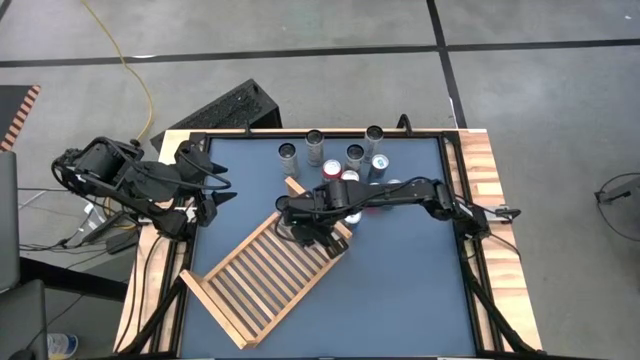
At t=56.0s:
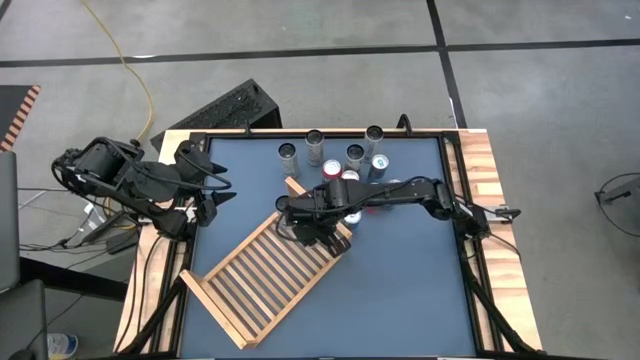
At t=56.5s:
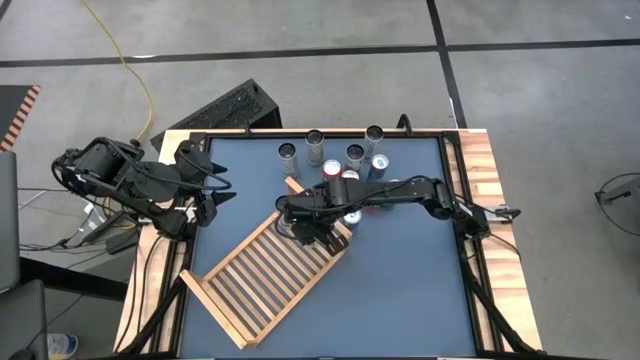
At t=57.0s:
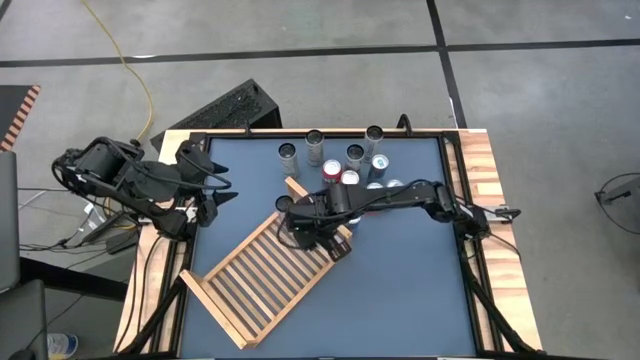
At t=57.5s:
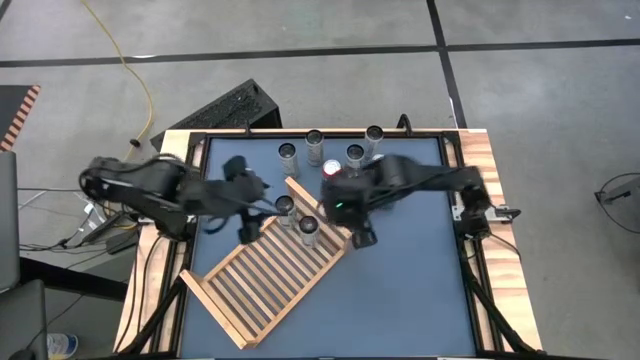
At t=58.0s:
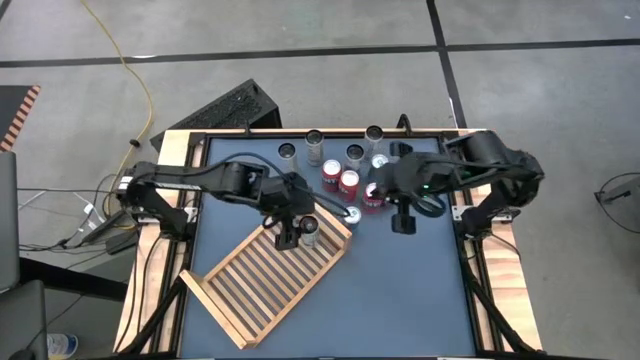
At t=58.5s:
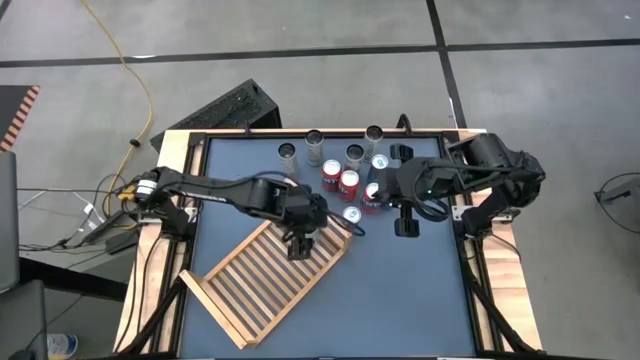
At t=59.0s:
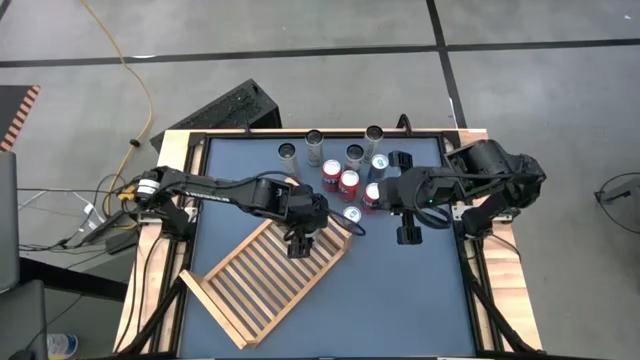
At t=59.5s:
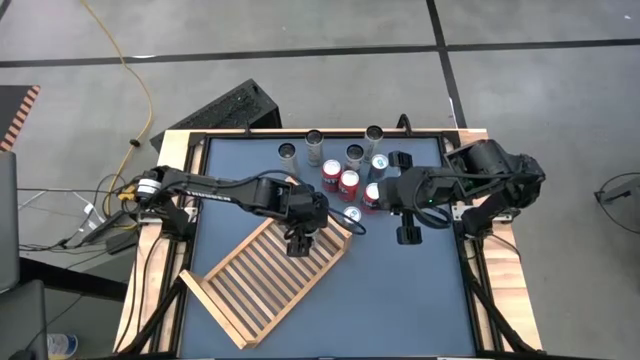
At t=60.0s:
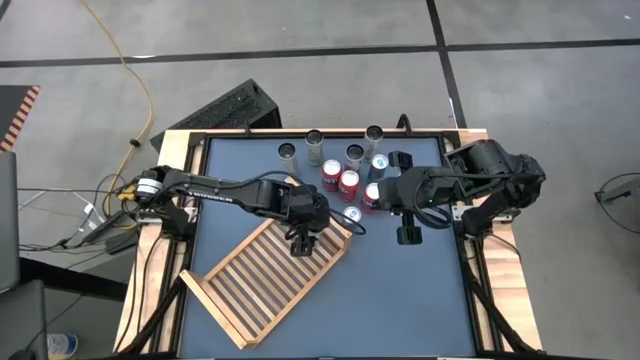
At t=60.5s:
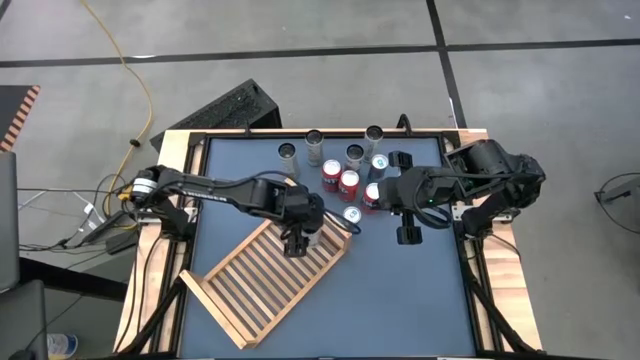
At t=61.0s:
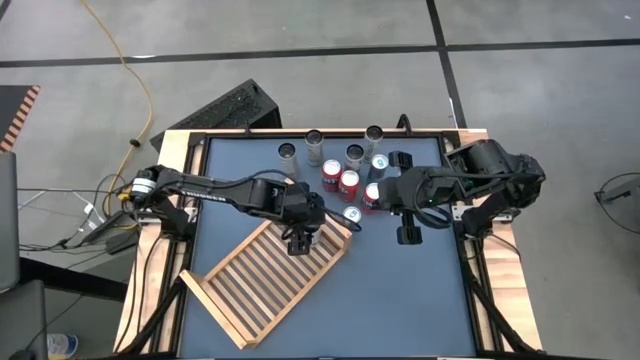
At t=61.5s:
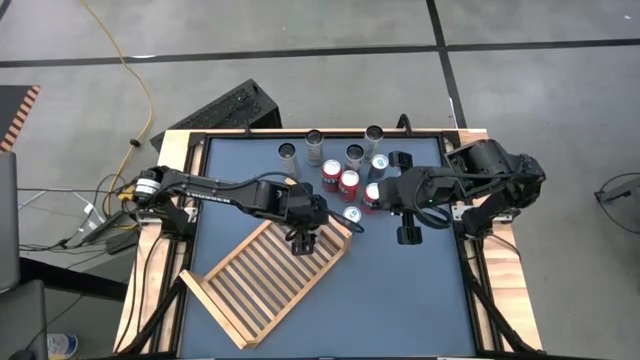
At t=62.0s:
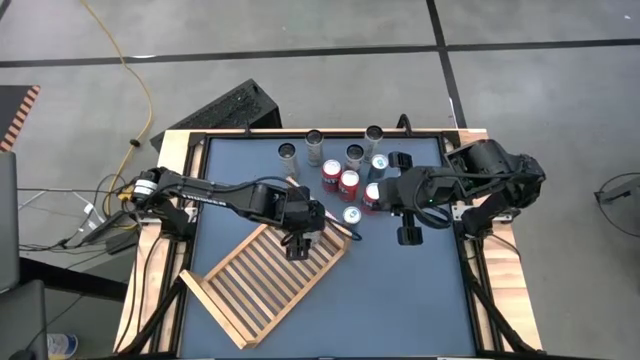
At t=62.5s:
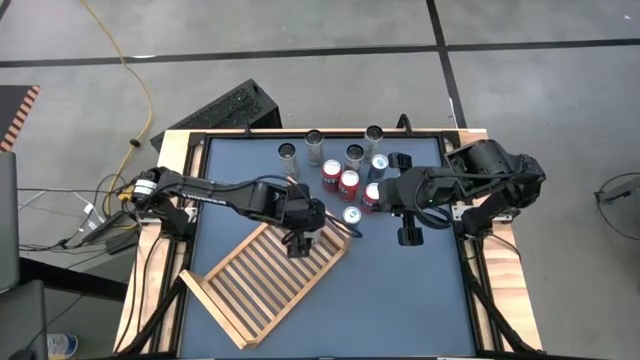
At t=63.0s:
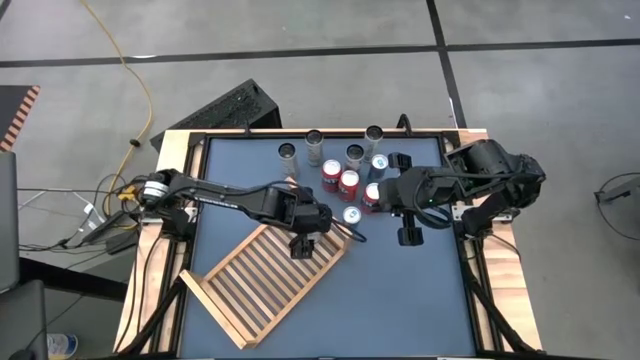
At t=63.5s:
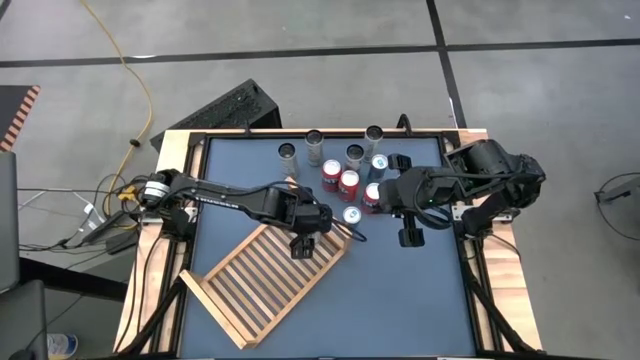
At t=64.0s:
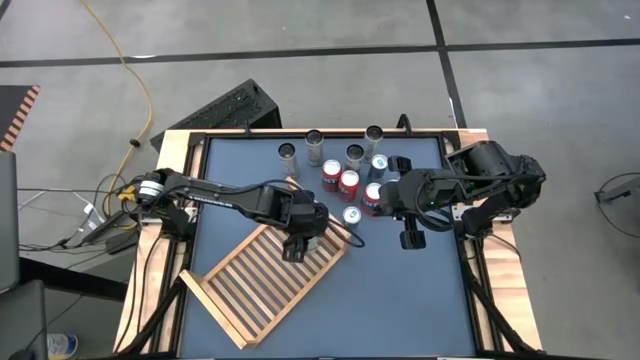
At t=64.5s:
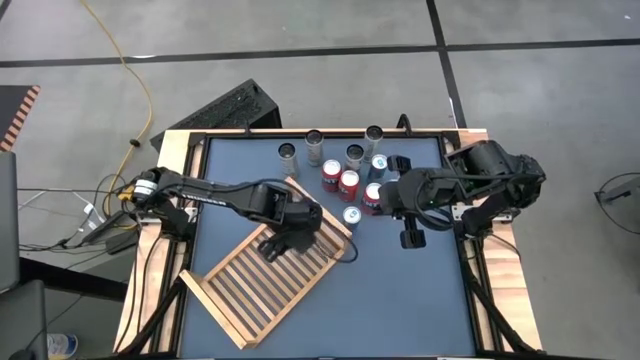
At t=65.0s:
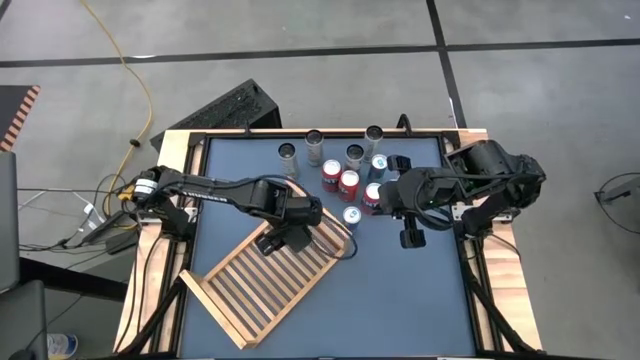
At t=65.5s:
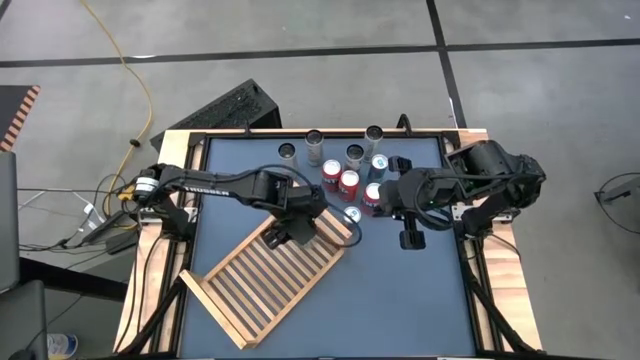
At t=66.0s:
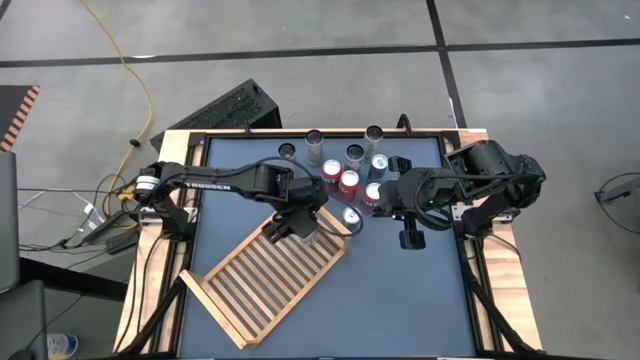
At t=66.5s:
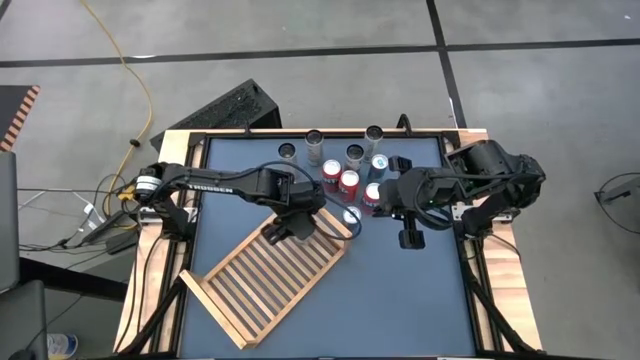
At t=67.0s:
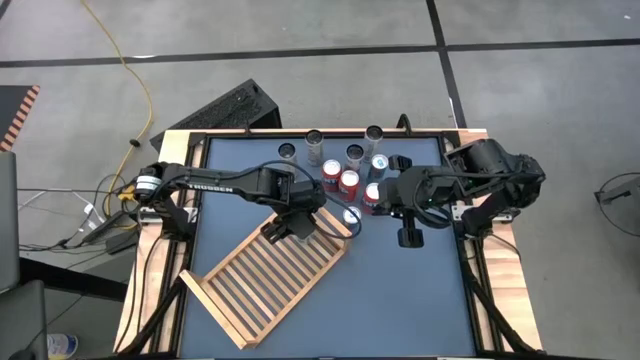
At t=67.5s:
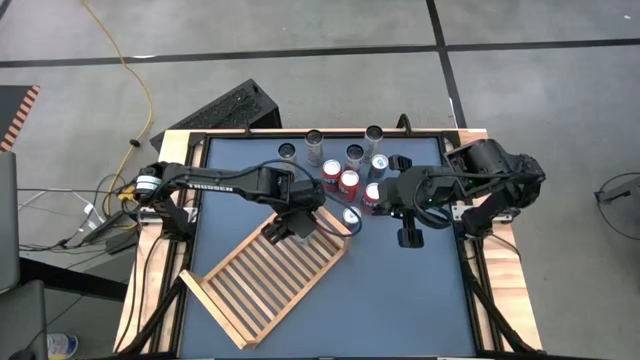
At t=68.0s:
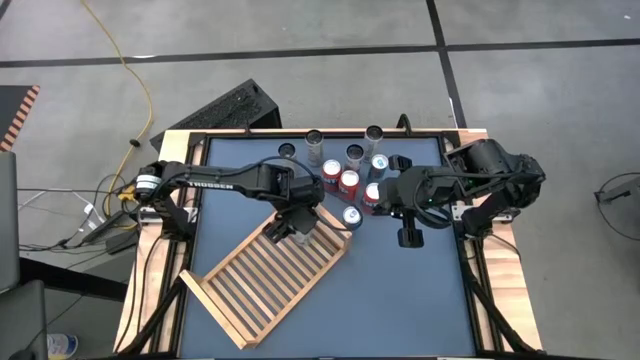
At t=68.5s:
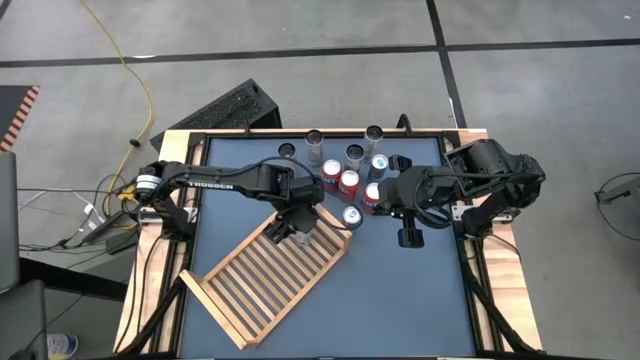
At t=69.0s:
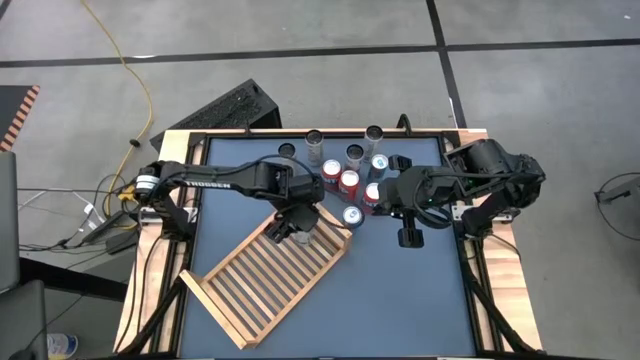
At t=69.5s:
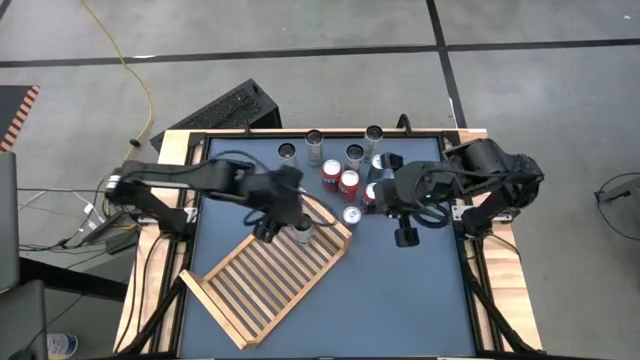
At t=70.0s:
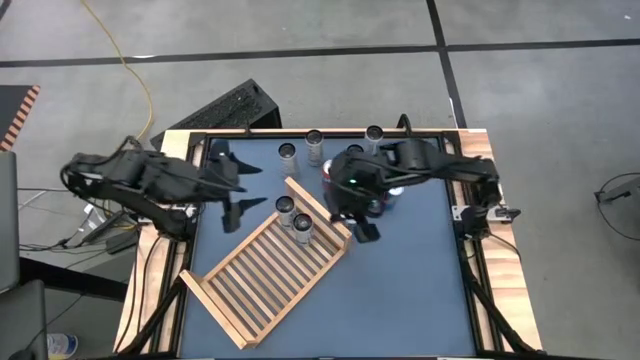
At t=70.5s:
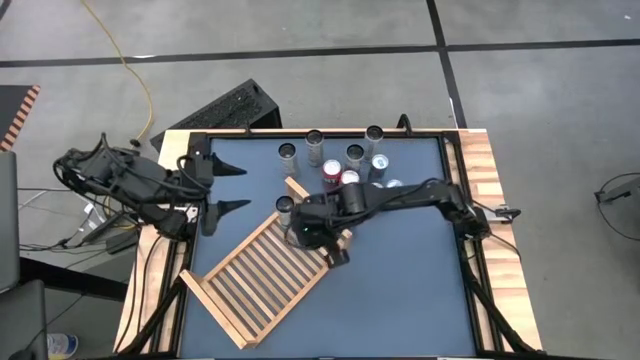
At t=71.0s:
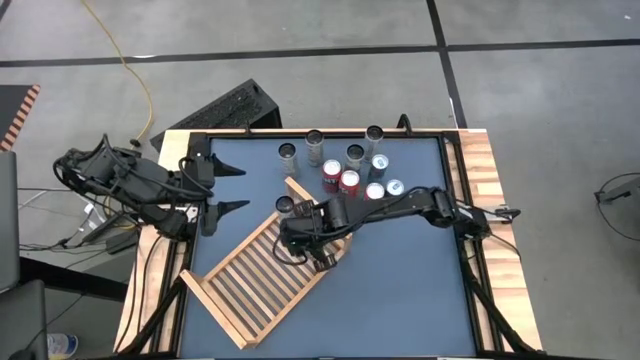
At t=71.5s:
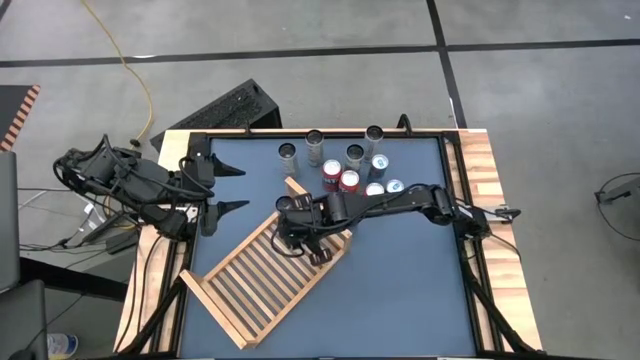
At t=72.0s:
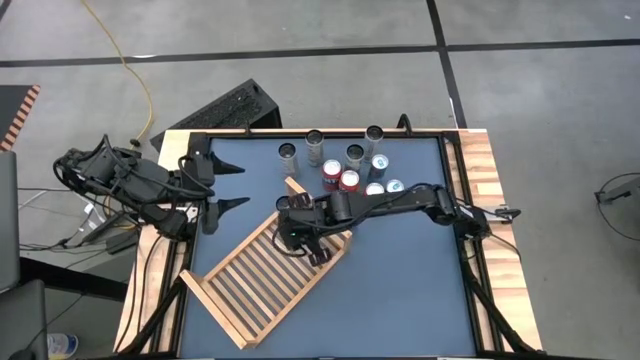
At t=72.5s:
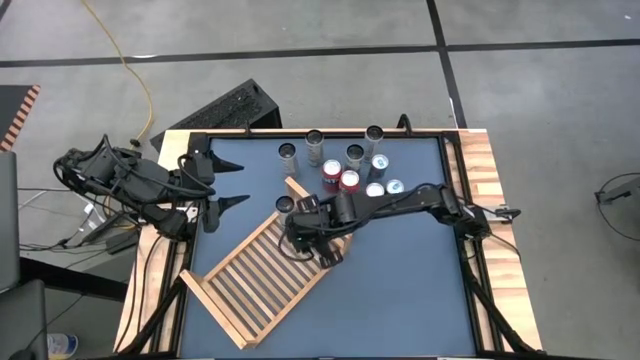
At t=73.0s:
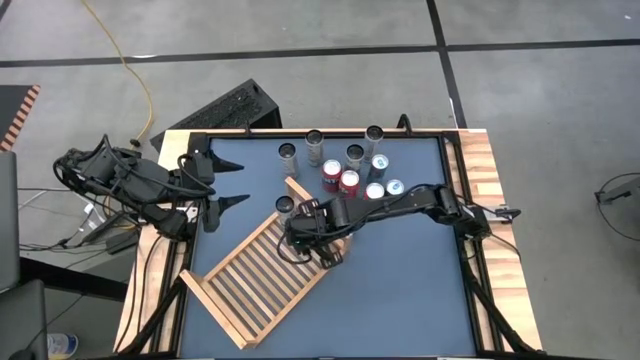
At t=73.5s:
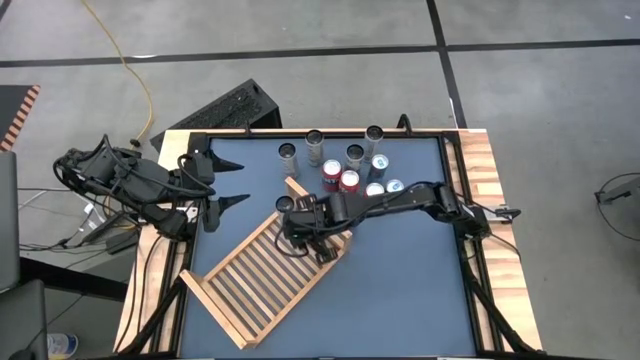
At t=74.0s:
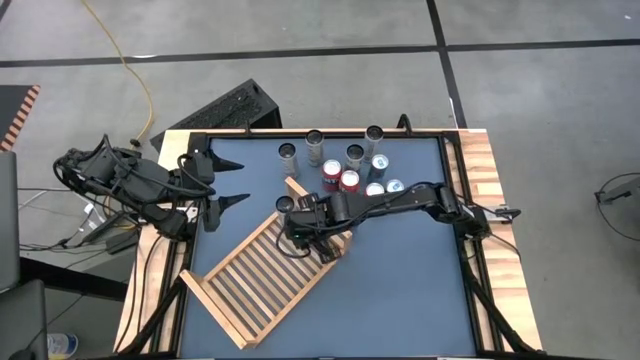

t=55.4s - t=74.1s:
Task: Place canned beverage on shelf
Put the right white blue soda can on the shelf aligned with the other white blue soda can

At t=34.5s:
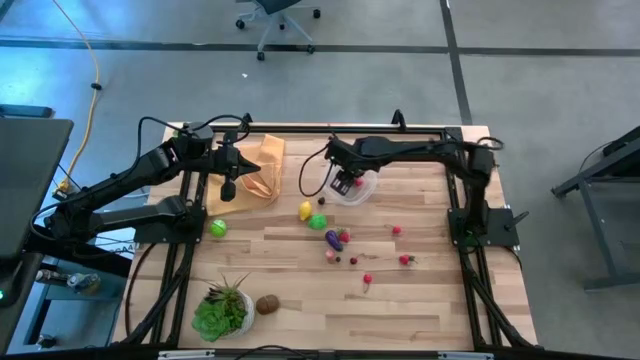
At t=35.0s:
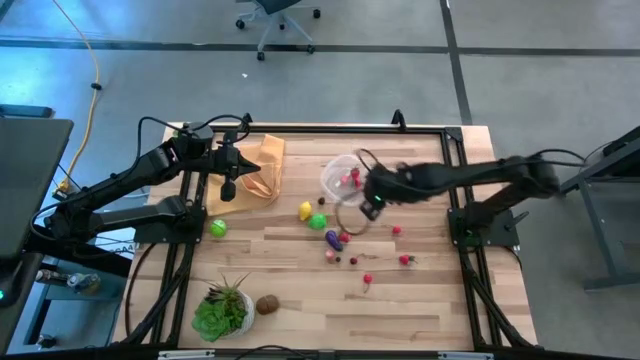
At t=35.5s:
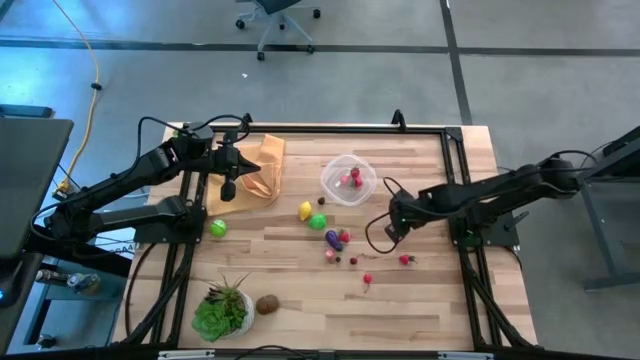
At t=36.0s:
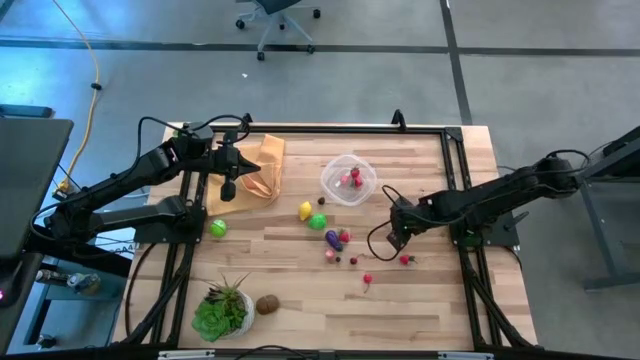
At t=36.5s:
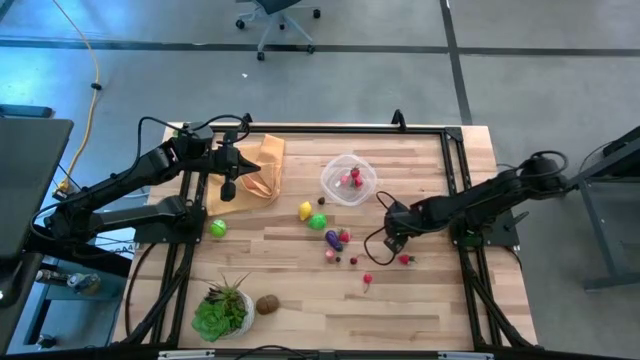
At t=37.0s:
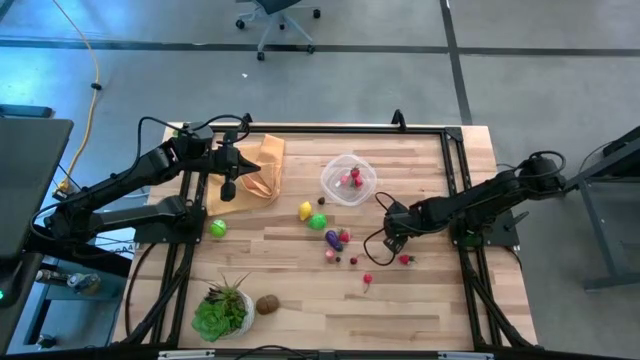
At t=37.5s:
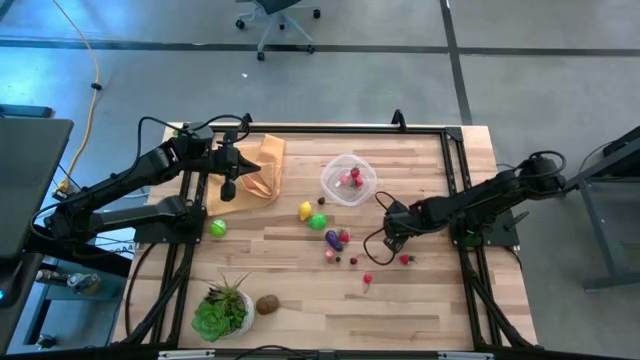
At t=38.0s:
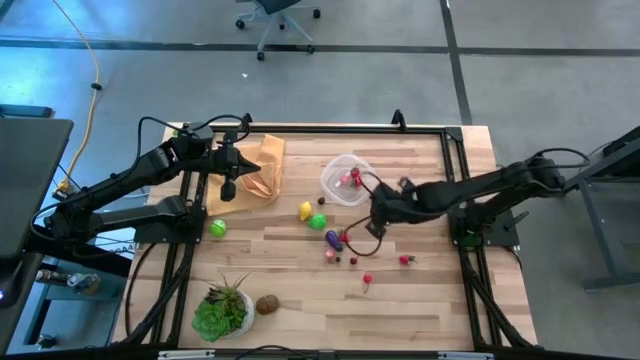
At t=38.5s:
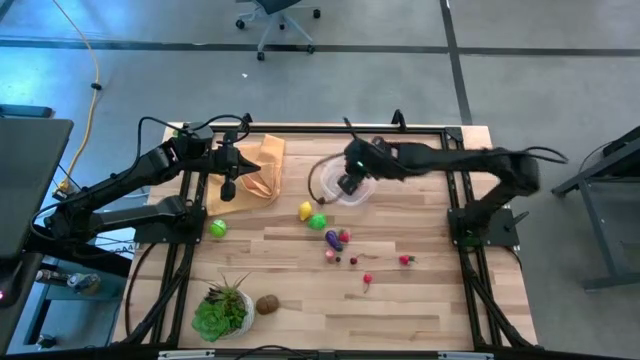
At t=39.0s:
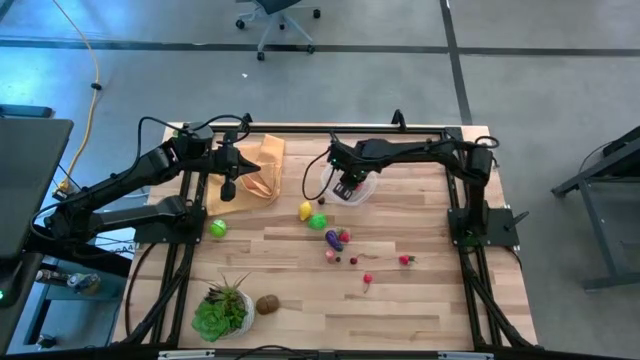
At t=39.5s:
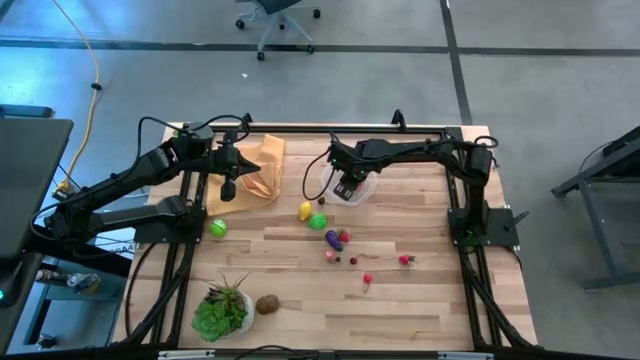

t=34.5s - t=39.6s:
Task: Pick and placing Produce into tupperware
Put the red cherry into the transparent container
